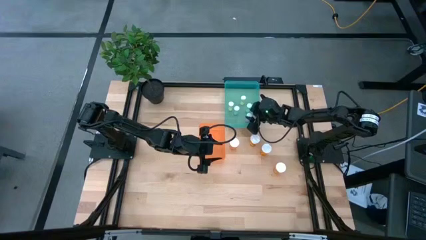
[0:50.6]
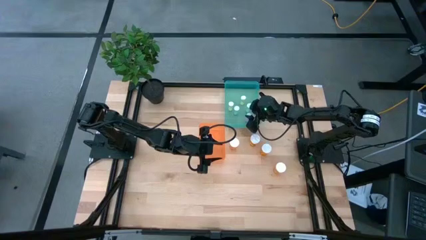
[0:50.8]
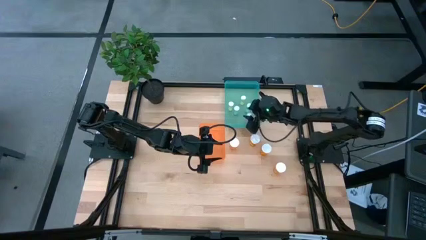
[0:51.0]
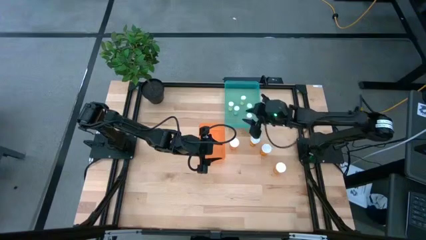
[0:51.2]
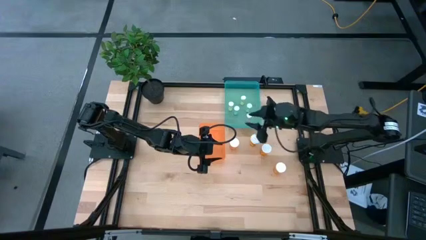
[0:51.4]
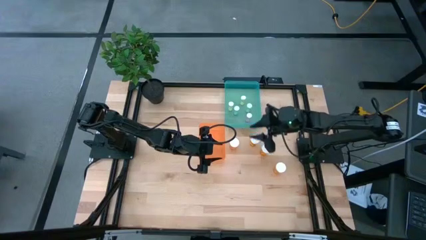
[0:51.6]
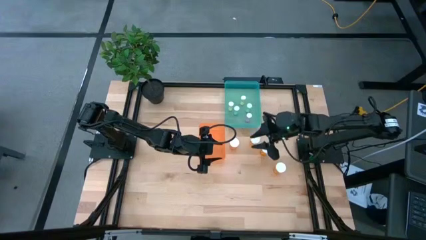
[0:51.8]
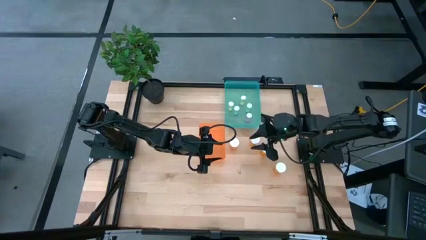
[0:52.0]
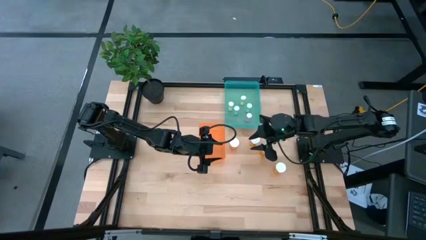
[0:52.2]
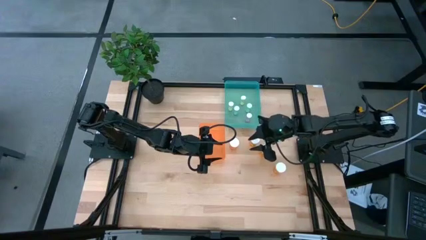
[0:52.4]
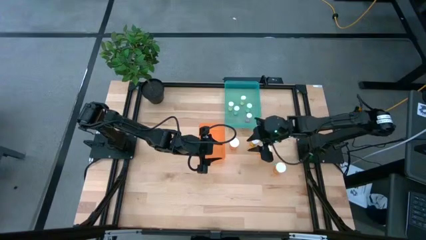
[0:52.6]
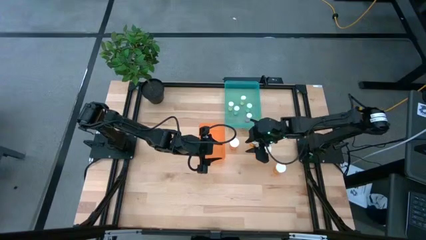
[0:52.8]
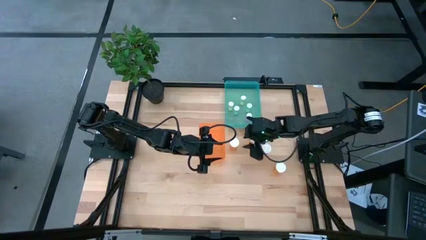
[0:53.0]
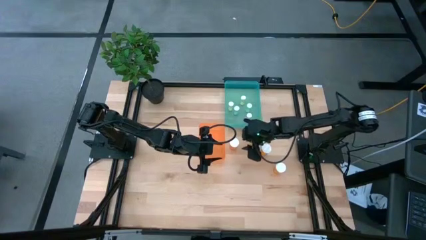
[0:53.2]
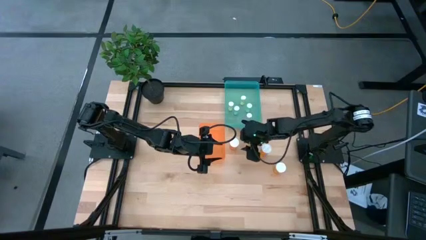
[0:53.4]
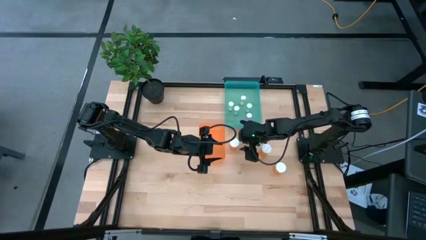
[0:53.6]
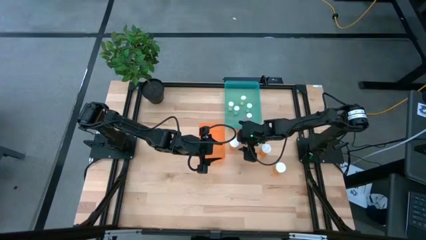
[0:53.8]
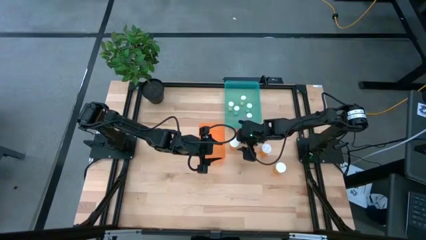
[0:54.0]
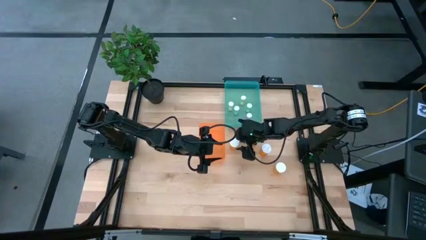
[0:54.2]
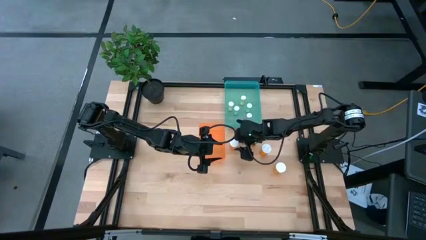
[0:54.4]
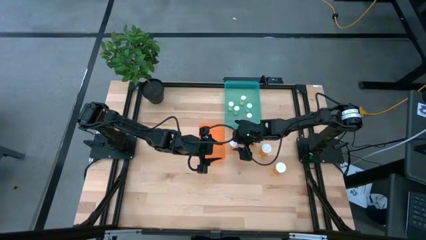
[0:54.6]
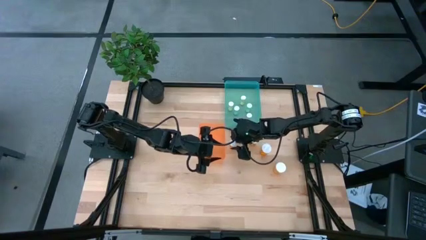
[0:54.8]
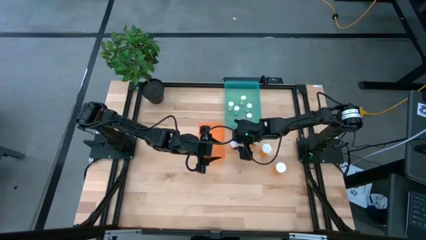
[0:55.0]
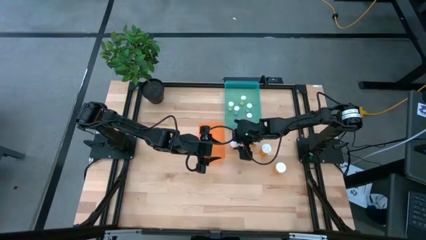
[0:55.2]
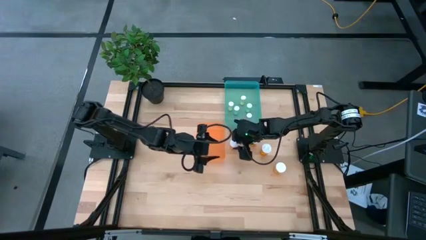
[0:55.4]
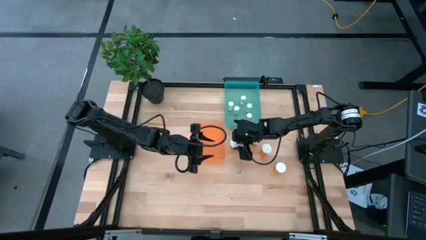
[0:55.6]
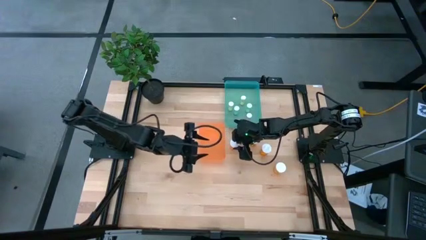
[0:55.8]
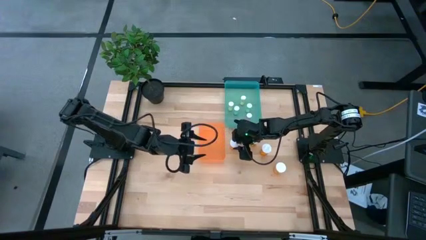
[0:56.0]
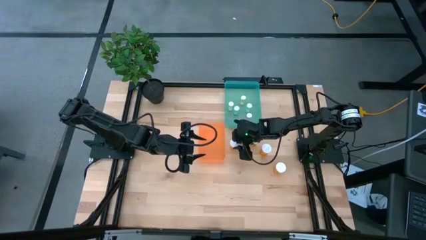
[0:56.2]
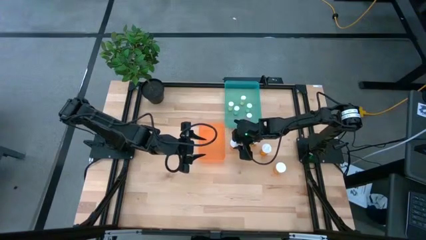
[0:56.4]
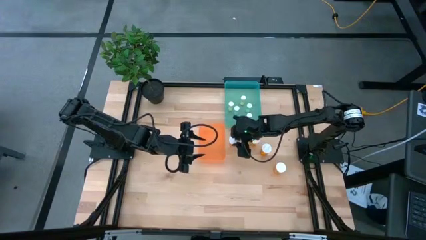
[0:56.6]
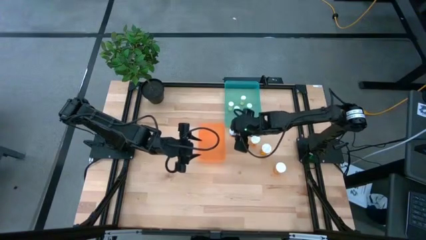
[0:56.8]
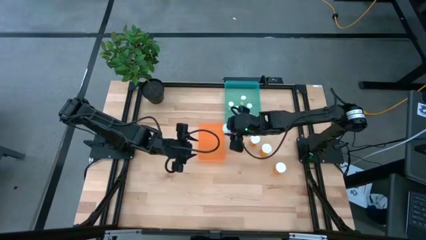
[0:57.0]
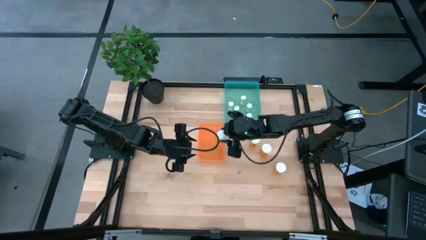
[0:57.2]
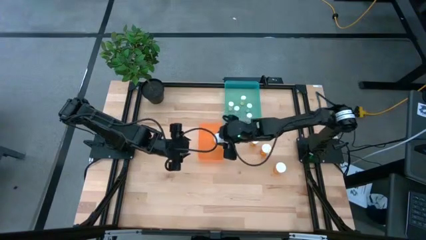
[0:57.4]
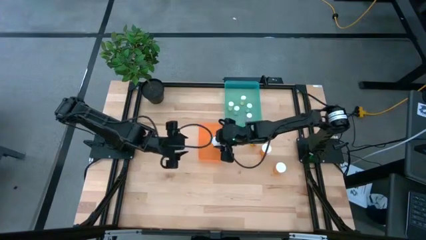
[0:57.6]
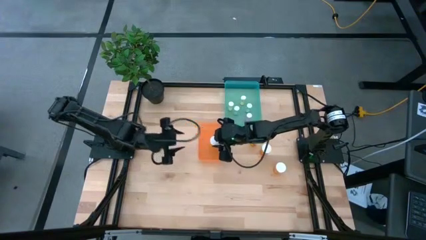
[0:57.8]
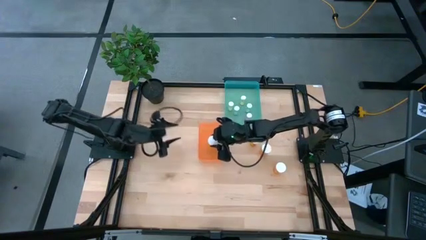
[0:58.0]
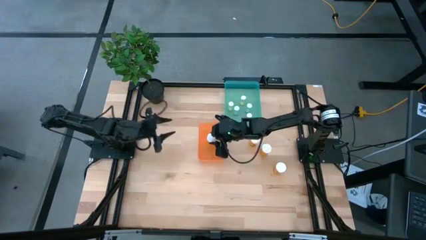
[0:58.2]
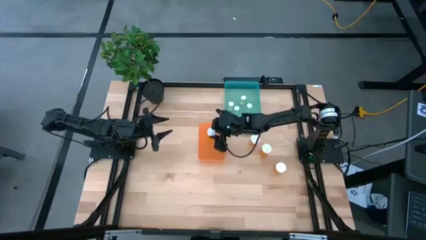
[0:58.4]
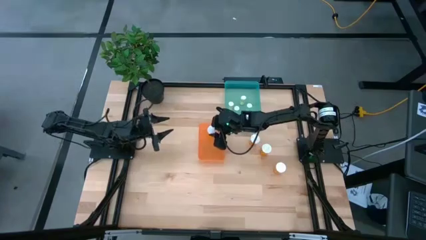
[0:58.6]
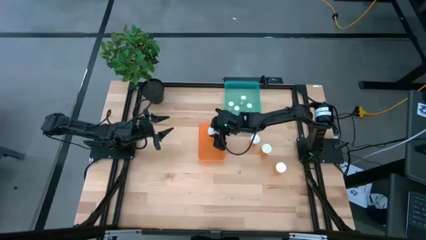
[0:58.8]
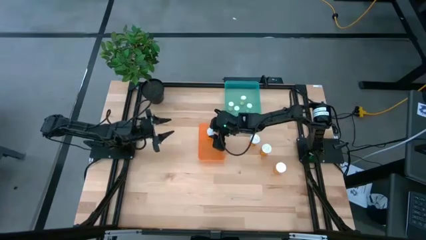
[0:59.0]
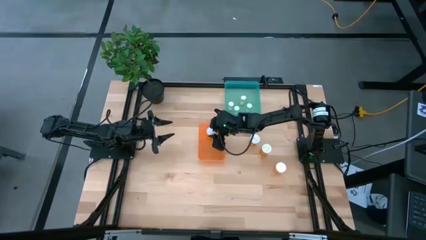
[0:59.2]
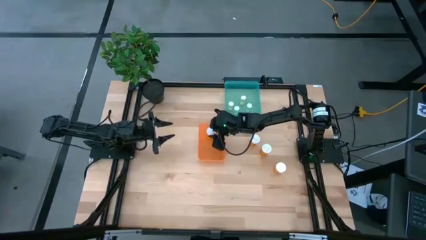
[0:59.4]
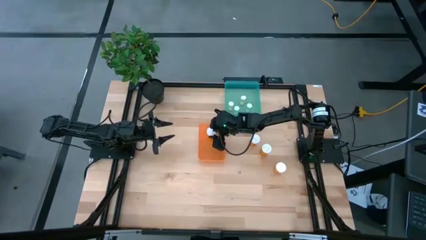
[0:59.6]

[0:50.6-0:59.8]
Task: Pick and place medicine bottles into bin by pill shape (circle, oval)
Put the orange capsule bottle into the orange bin

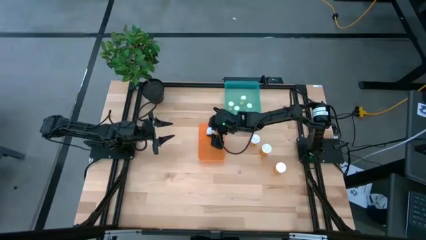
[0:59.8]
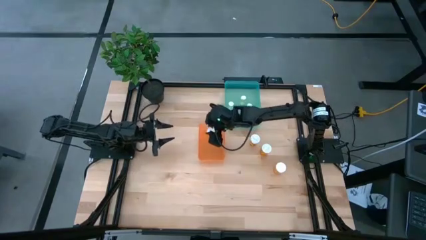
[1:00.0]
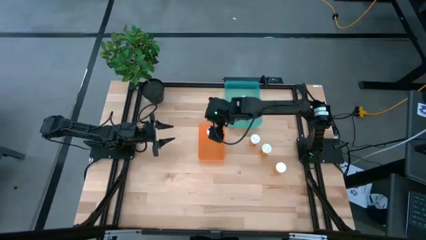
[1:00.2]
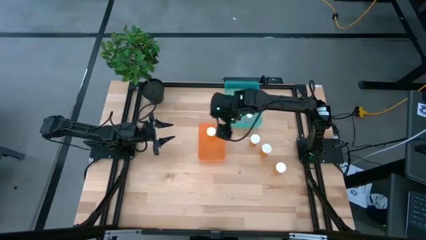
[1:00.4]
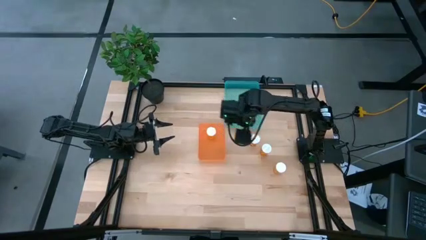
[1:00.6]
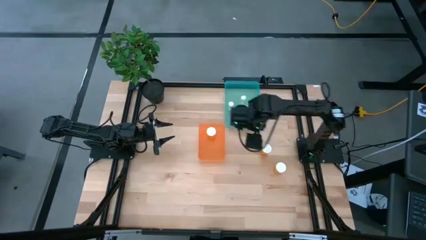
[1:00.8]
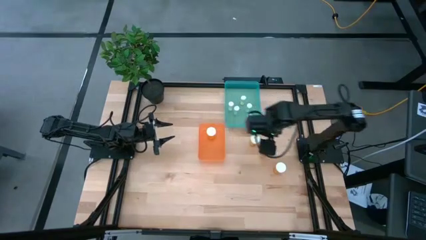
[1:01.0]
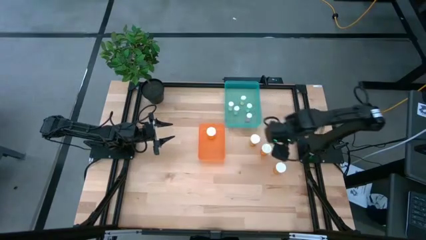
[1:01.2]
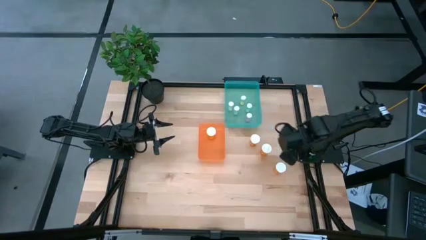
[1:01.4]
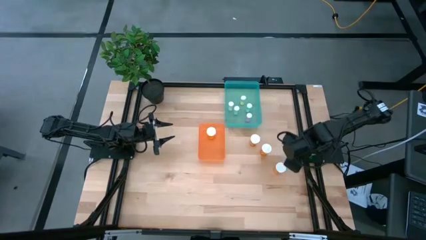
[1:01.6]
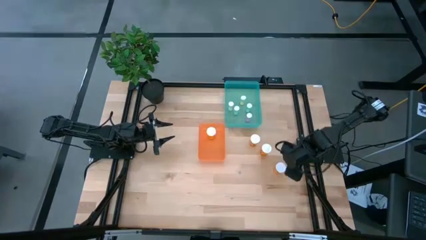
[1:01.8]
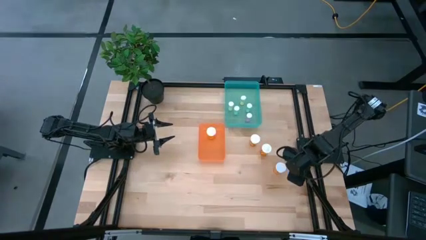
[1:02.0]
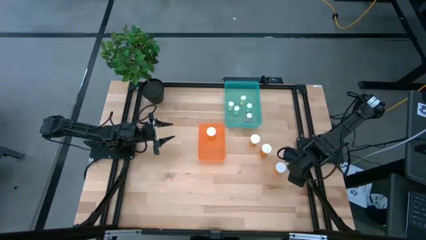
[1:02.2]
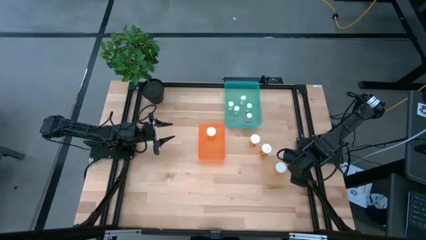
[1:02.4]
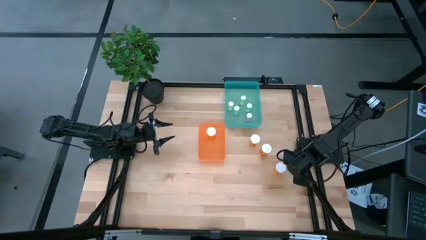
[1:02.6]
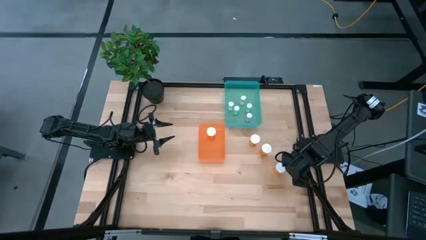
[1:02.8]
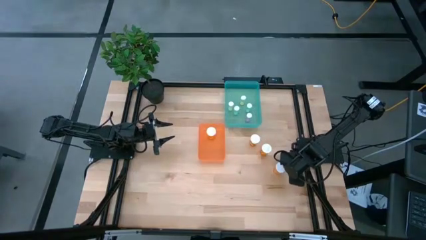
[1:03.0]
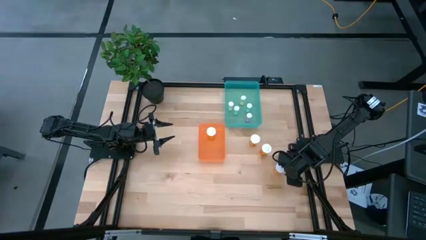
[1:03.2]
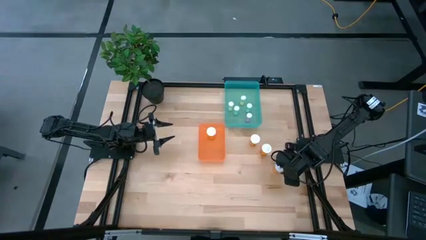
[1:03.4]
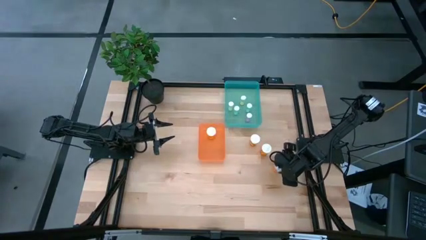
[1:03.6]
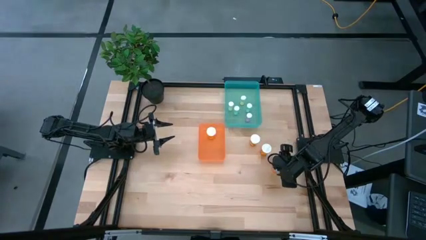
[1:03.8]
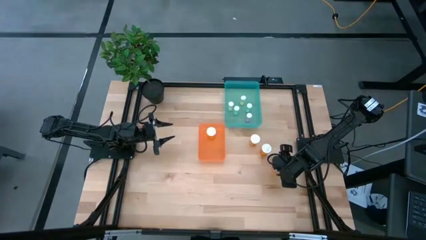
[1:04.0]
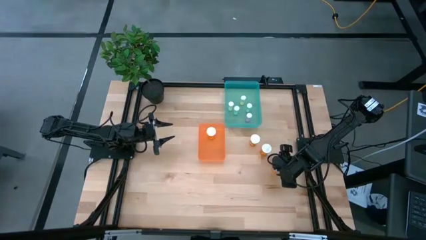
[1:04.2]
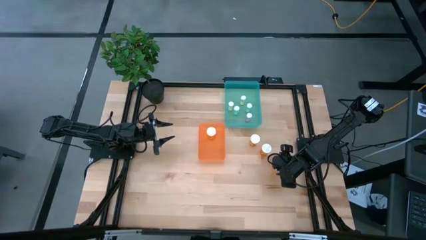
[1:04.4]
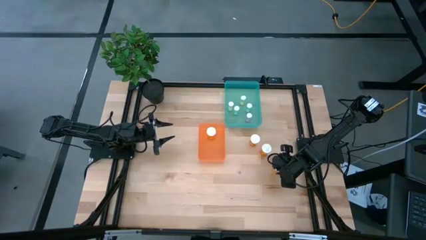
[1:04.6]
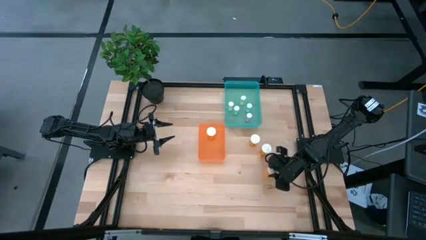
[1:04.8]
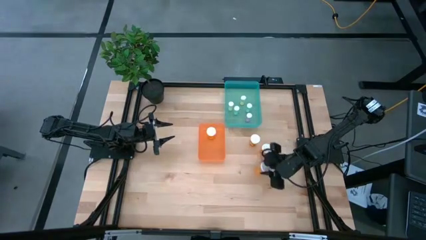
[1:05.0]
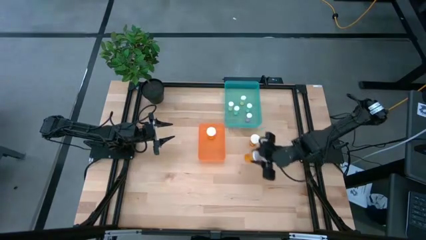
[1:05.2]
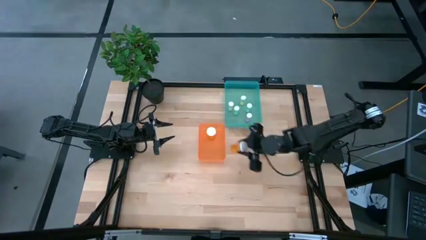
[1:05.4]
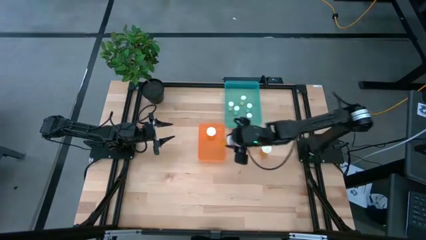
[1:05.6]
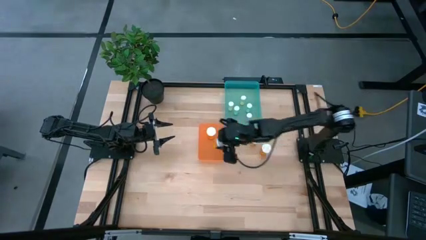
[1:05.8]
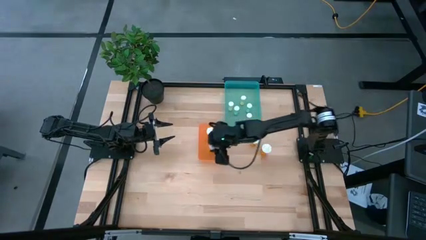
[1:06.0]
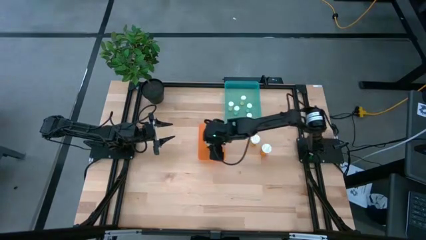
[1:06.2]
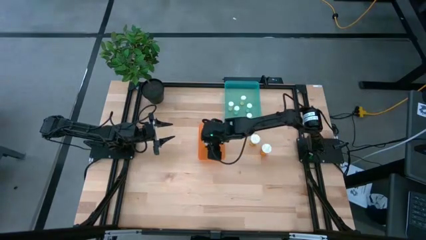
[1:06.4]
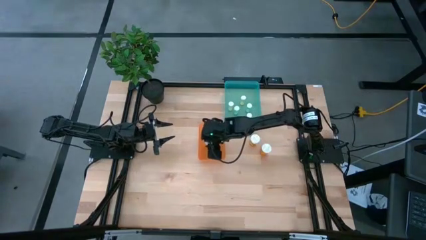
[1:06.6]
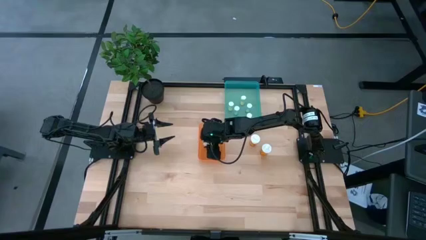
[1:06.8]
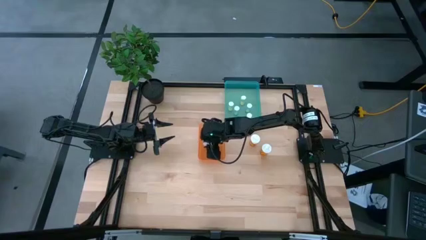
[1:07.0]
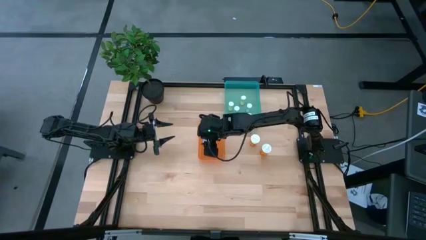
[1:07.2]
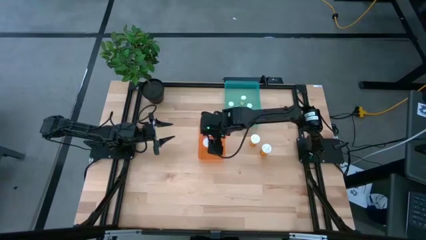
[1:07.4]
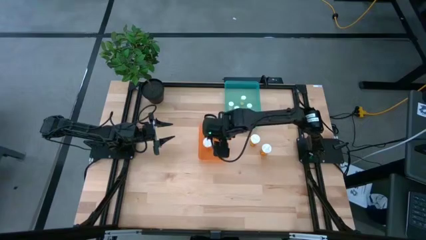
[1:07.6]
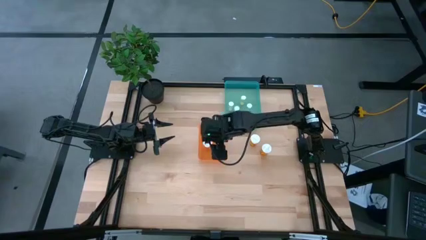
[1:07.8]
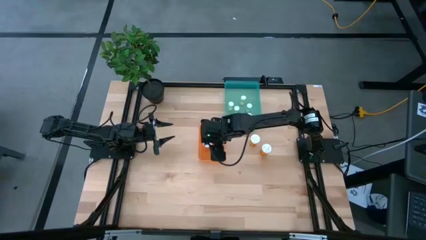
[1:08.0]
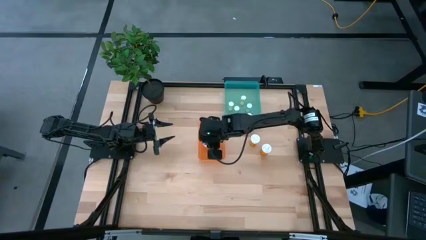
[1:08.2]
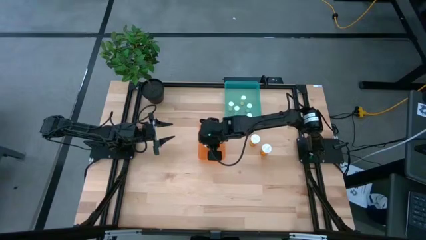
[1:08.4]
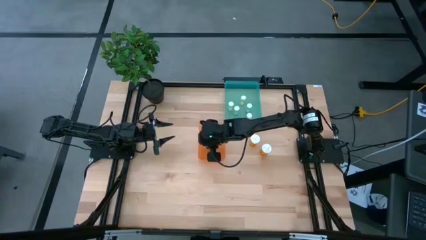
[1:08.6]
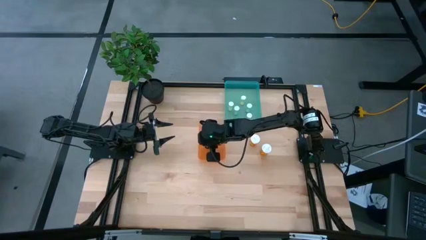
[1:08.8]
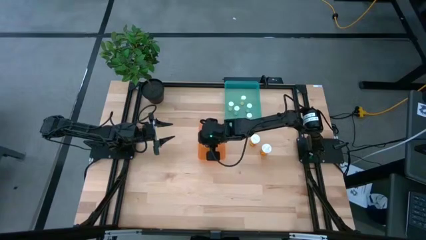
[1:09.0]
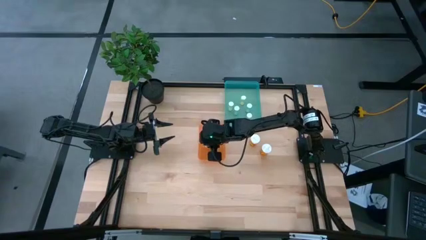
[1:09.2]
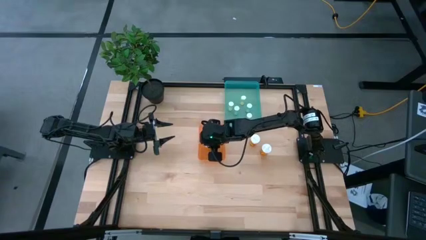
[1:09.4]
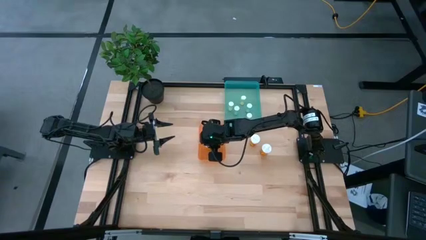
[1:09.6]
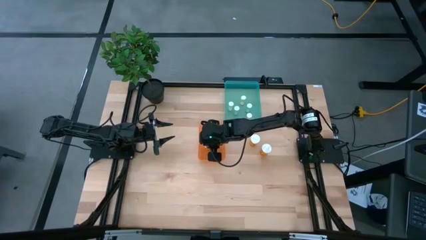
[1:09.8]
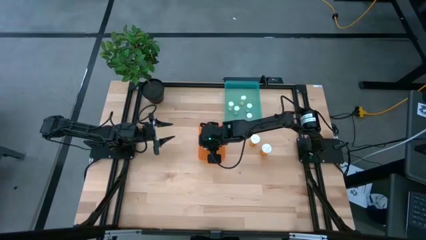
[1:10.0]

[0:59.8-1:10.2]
Put the orange capsule bottle into the orange bin
